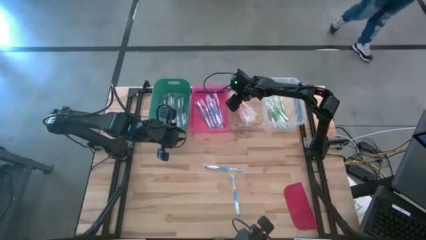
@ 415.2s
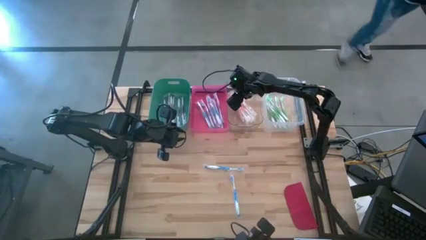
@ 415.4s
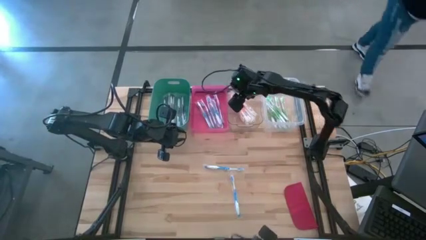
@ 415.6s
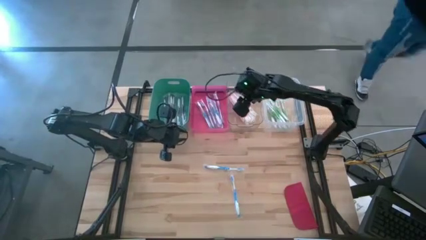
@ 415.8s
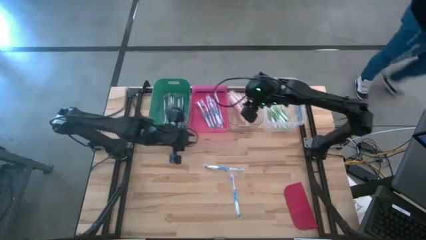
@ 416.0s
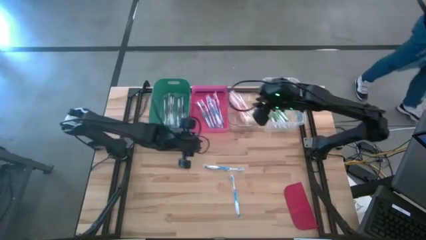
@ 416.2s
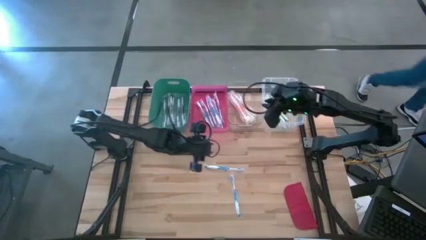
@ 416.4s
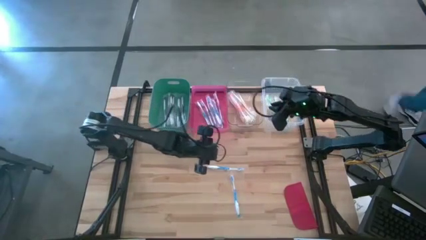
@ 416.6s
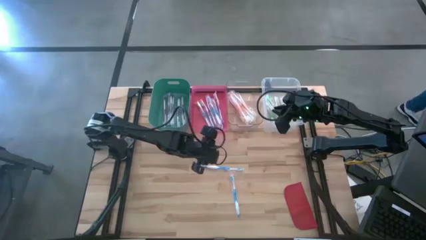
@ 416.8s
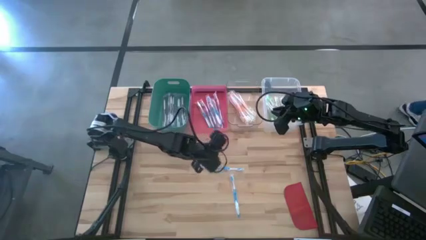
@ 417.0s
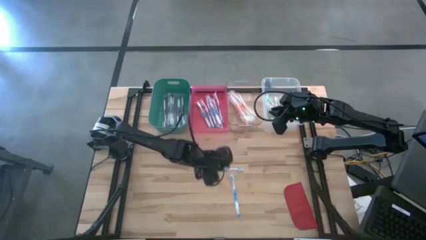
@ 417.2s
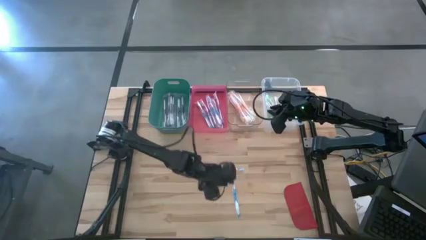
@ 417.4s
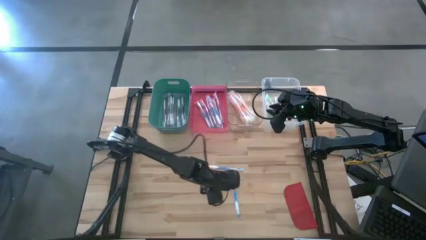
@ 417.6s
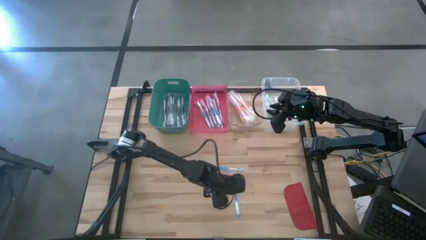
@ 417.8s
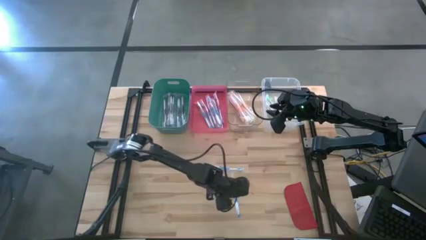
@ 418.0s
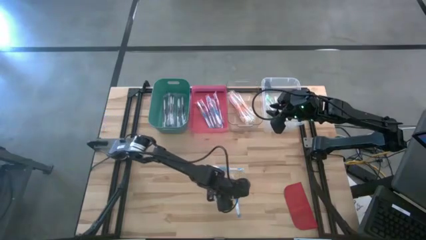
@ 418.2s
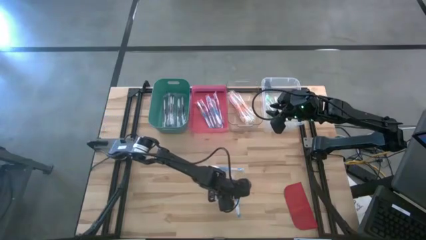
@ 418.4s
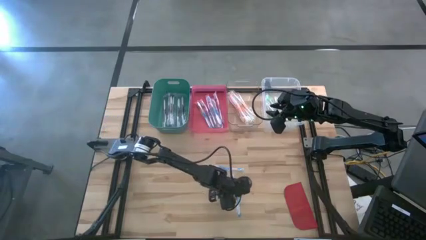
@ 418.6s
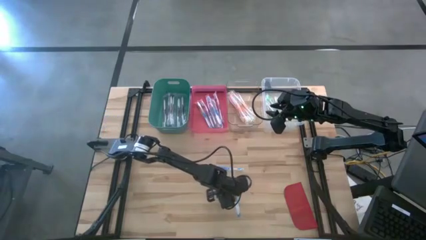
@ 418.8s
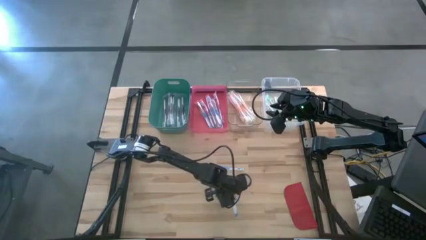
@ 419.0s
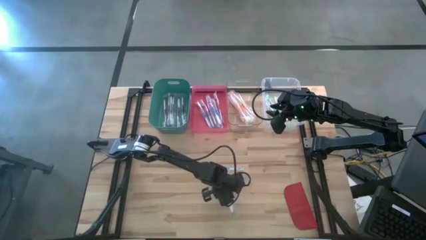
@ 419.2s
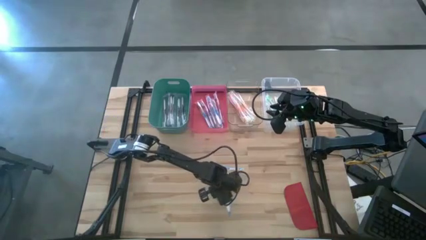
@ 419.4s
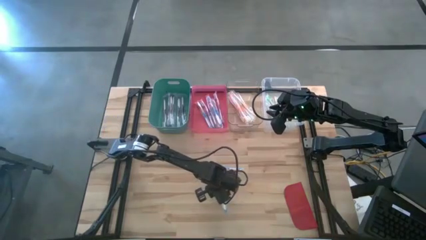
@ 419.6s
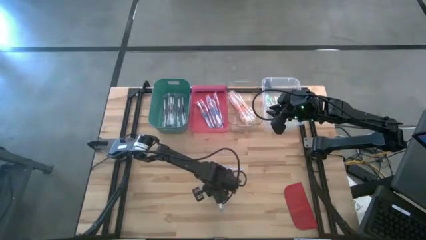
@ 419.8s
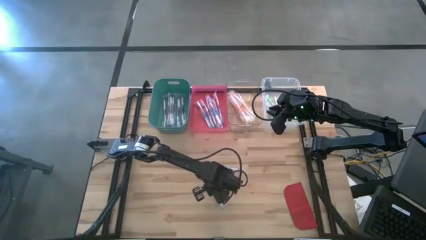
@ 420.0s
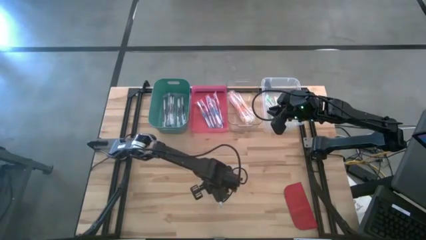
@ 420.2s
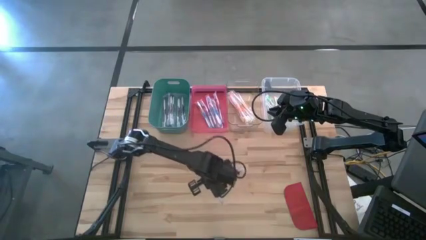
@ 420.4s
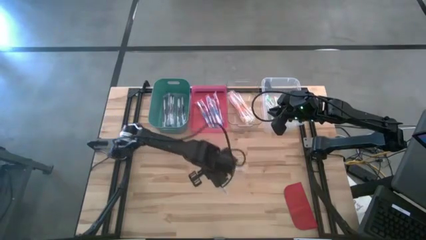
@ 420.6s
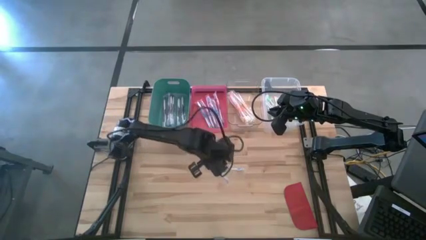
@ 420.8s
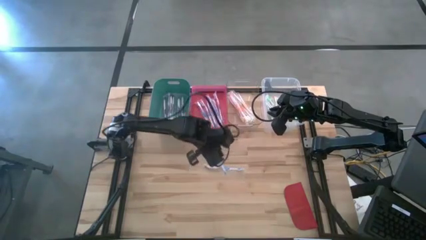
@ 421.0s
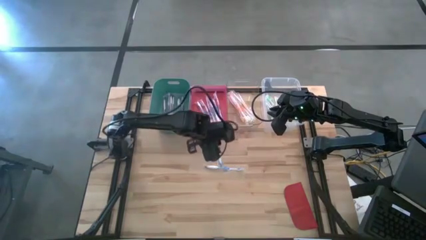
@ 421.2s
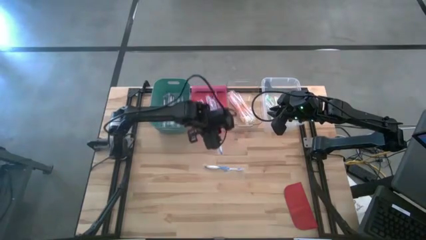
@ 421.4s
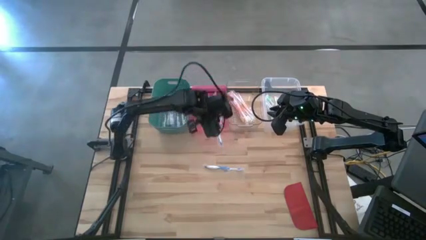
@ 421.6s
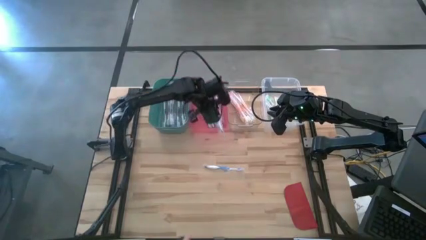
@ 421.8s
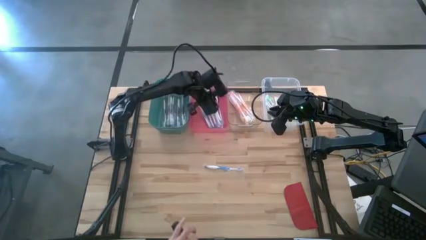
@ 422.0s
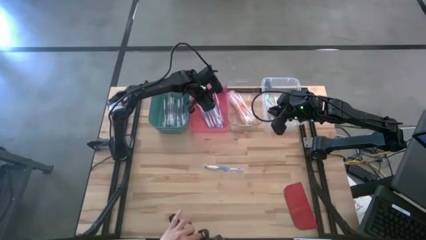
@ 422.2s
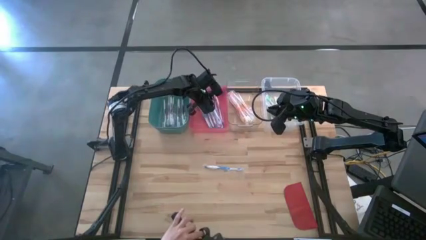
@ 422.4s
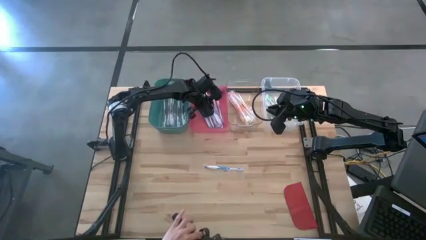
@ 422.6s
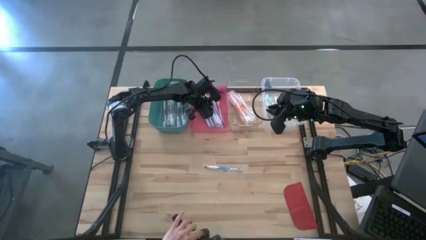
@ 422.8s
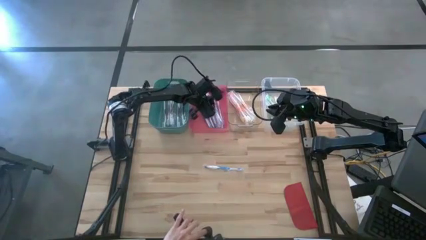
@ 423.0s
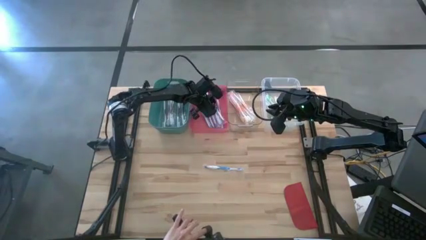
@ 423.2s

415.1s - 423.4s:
Task: Pick & Place Toothbrushes
Put the blue toothbrush into the red bin

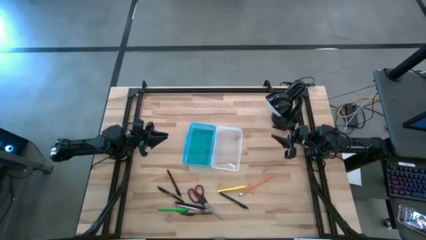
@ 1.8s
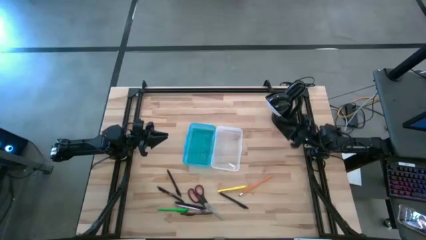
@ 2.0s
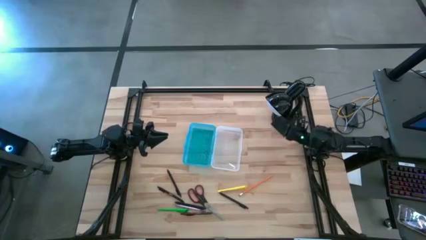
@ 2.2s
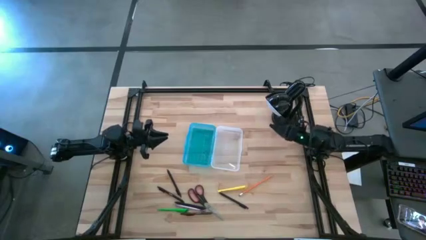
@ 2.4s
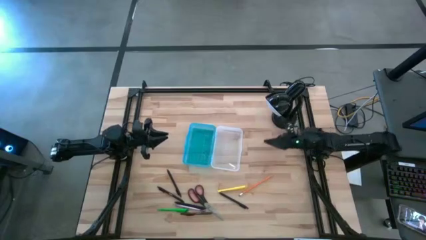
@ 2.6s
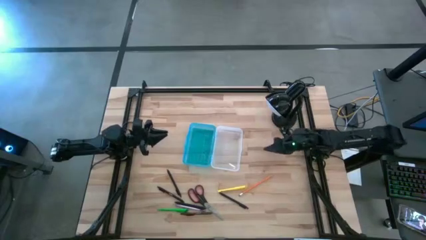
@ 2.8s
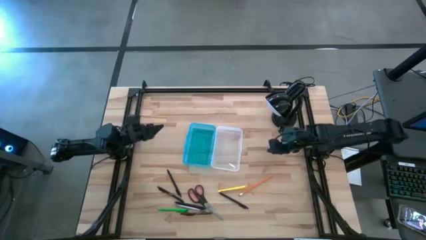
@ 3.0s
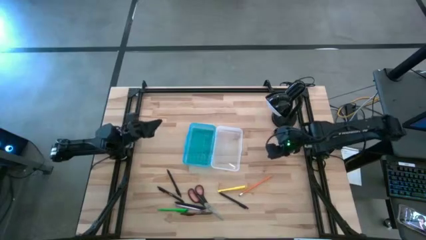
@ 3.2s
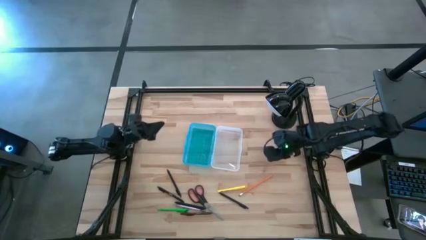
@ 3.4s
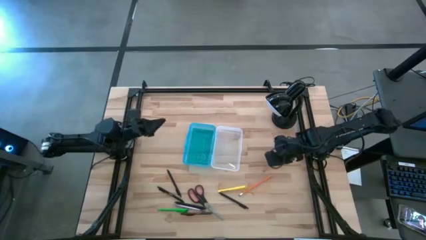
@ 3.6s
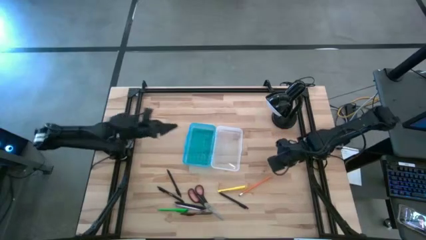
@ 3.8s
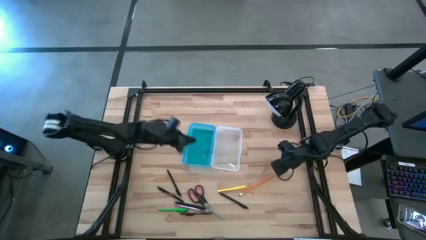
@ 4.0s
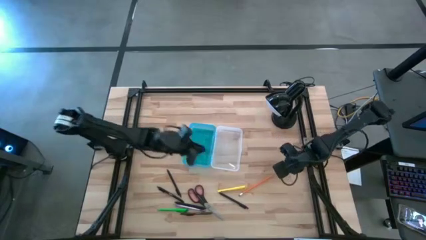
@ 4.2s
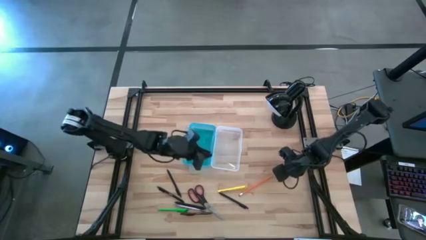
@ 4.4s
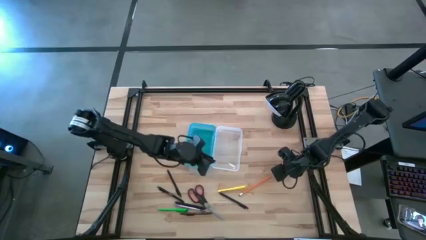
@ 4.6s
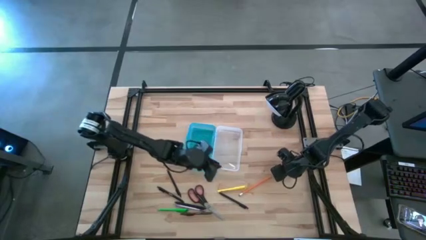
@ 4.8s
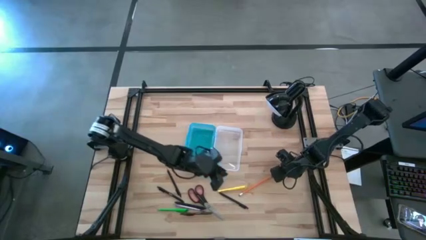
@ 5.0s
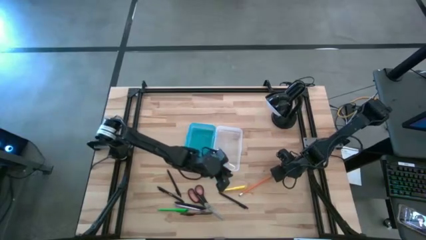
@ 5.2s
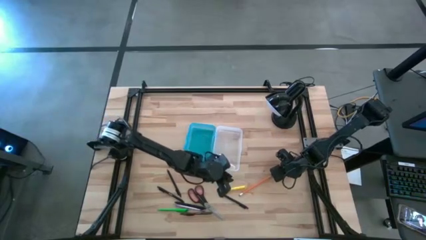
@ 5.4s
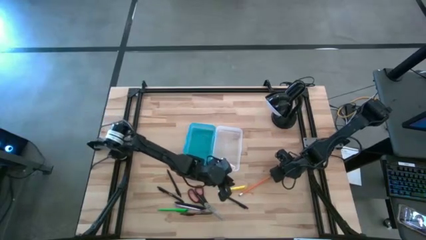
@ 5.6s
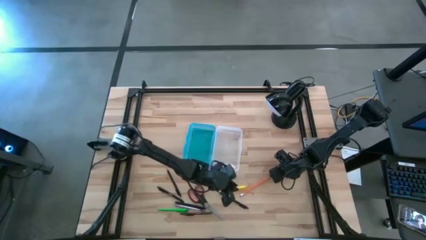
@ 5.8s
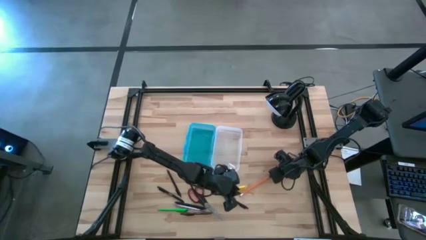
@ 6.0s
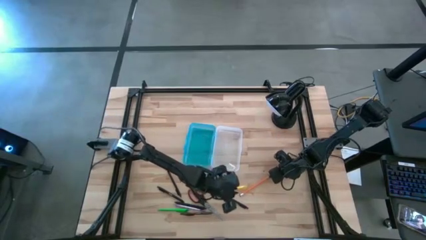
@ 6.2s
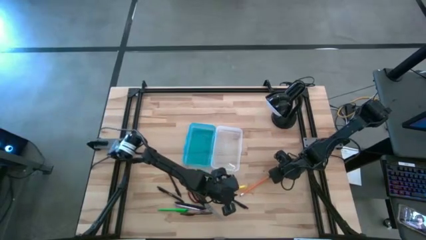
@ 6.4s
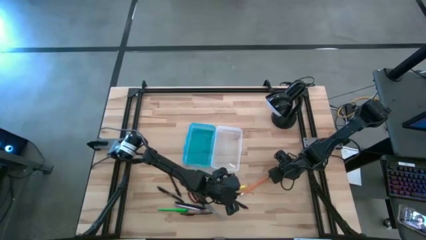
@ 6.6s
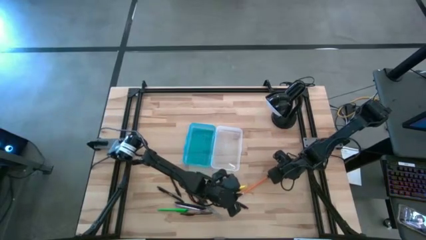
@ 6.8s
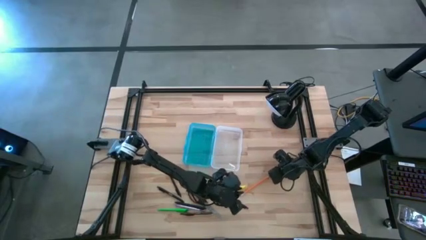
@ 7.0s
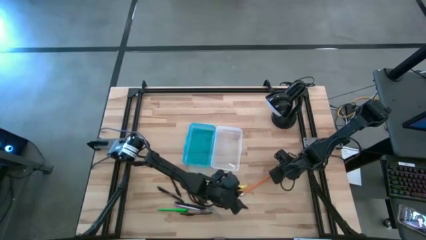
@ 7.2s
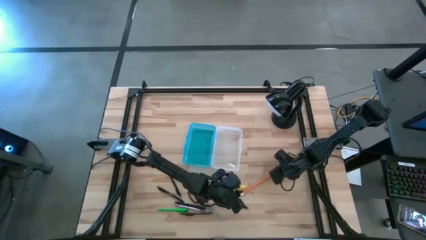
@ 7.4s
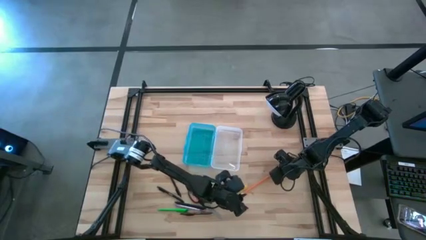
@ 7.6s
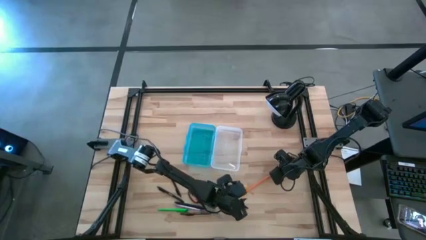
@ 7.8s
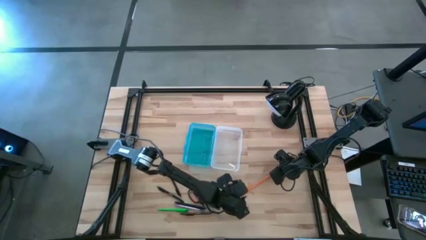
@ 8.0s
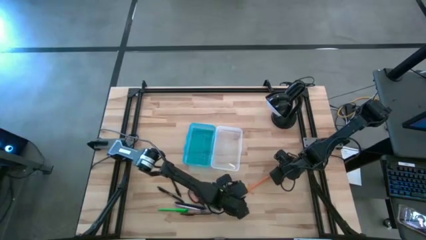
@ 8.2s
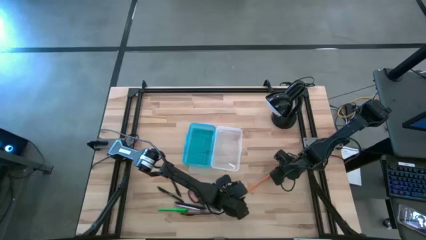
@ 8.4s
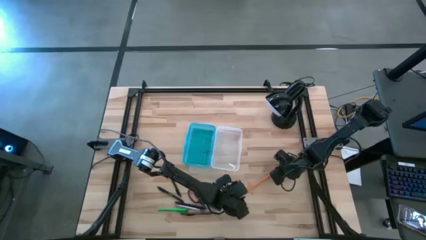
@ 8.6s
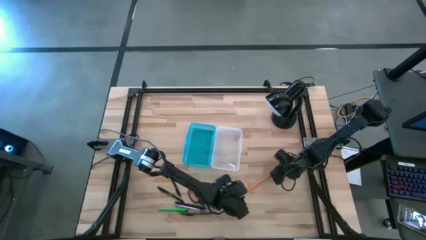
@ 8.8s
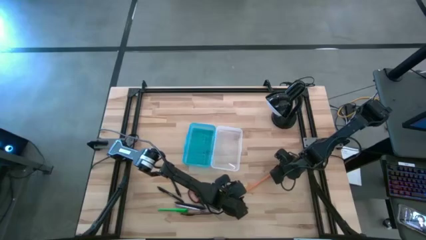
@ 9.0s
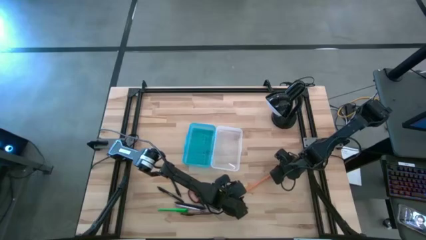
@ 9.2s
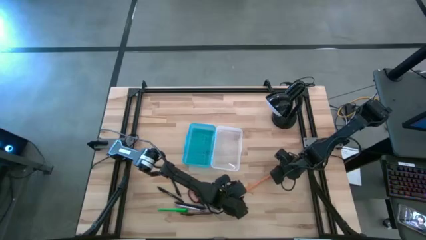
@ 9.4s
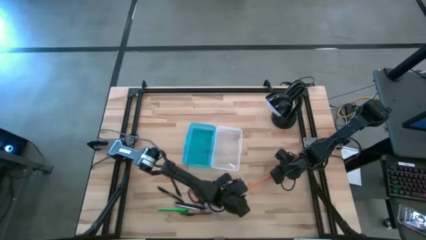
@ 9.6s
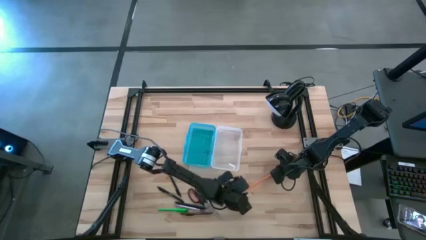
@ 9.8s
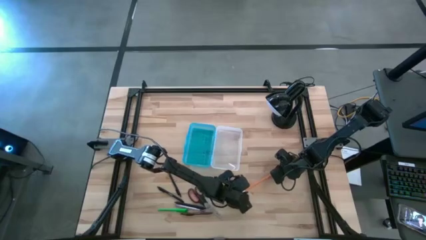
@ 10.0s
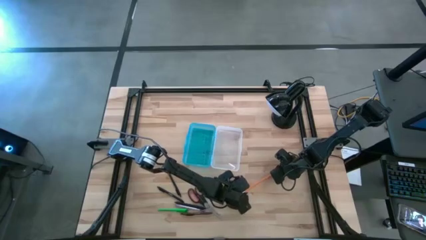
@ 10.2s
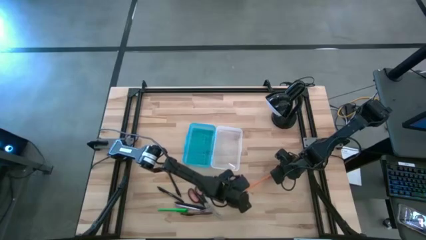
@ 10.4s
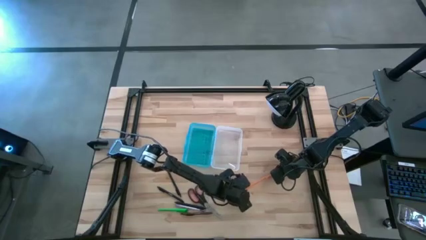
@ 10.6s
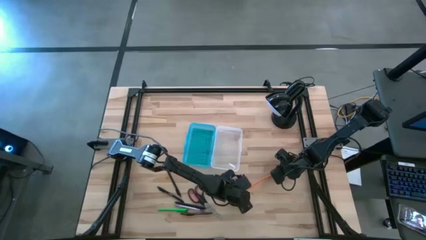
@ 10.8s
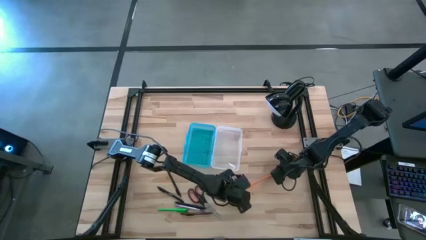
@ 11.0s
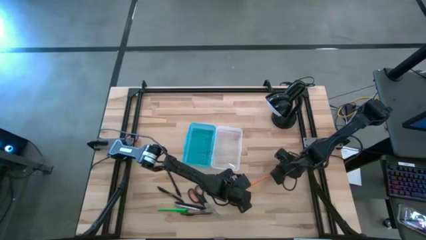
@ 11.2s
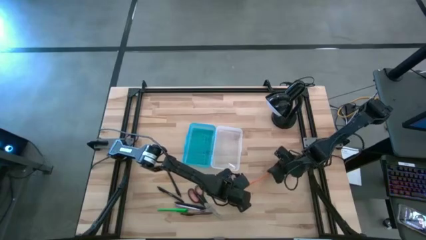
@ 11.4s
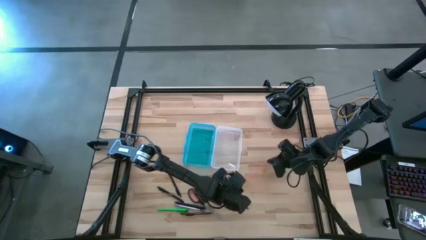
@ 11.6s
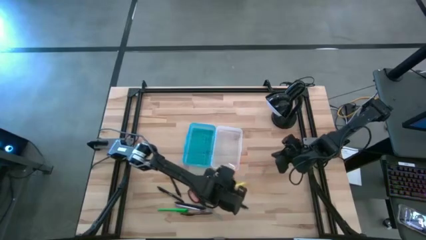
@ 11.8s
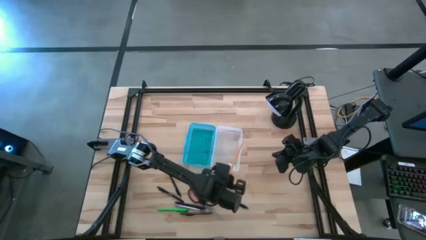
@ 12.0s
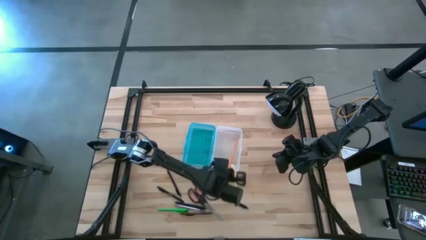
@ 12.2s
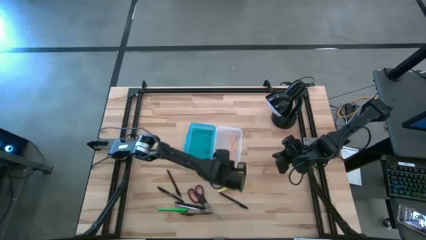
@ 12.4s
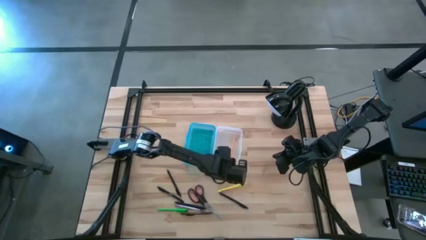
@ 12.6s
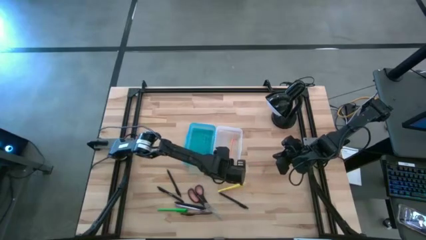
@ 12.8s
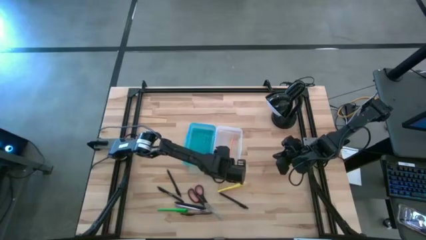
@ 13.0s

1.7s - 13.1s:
Task: Pick & place school supplies into a supply box
Put the orange pencil into the supply box
